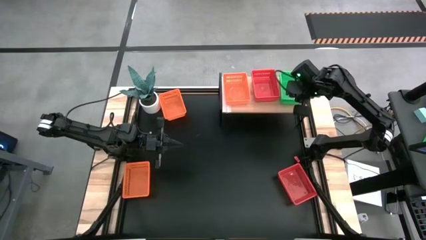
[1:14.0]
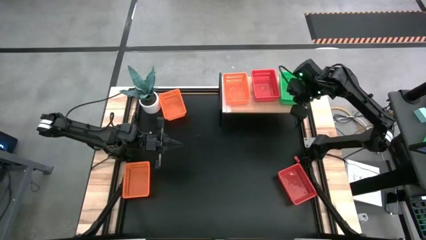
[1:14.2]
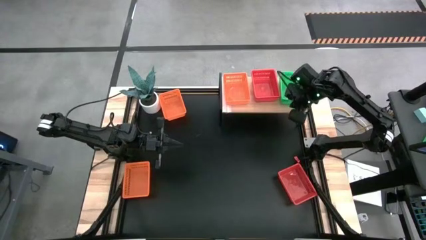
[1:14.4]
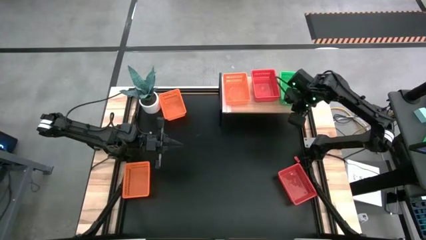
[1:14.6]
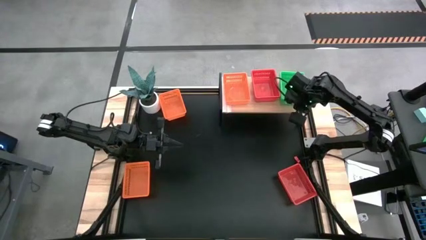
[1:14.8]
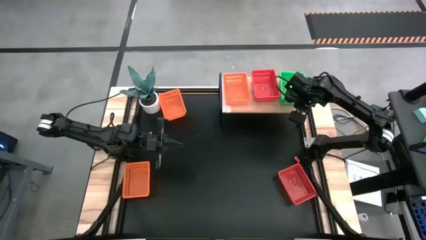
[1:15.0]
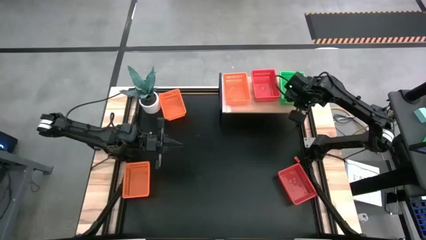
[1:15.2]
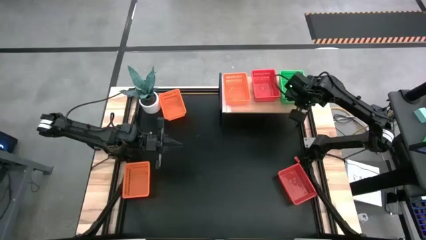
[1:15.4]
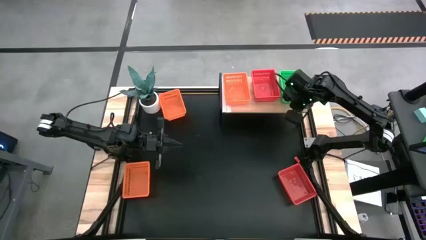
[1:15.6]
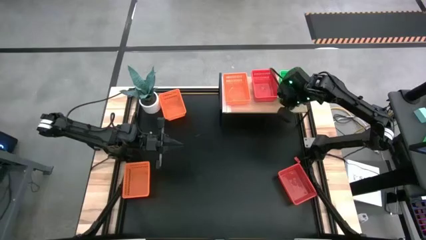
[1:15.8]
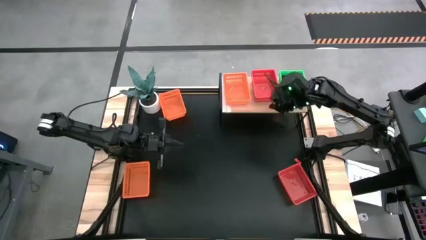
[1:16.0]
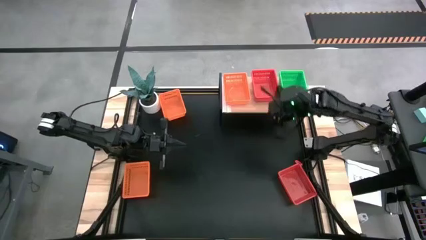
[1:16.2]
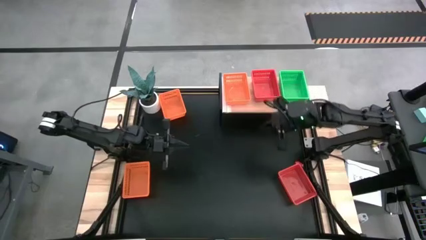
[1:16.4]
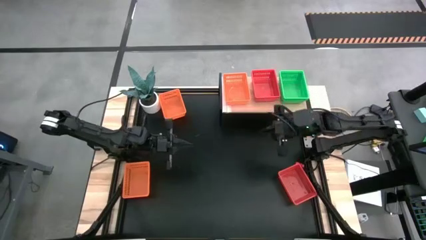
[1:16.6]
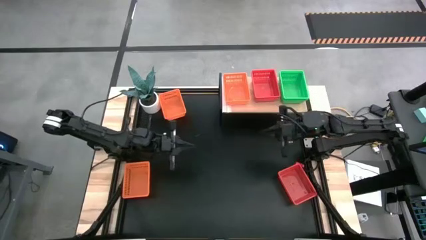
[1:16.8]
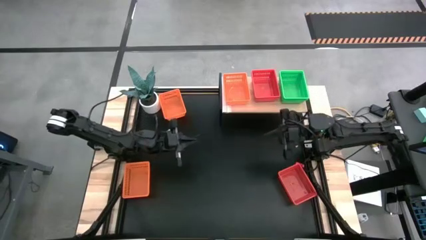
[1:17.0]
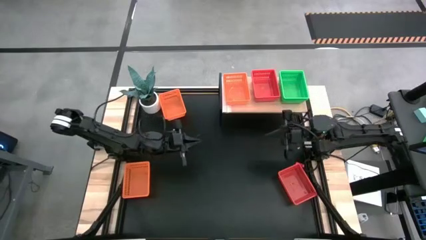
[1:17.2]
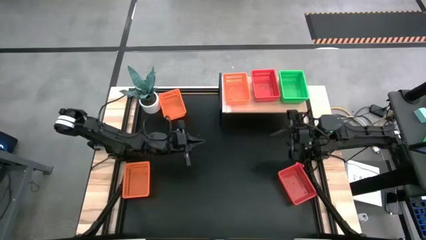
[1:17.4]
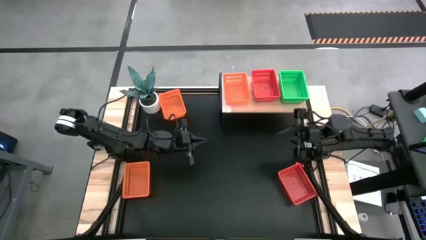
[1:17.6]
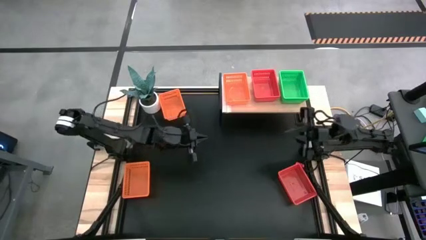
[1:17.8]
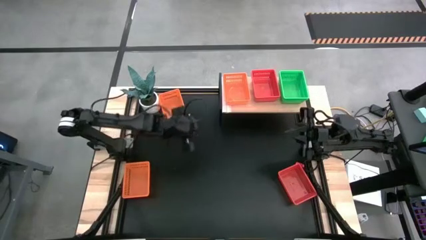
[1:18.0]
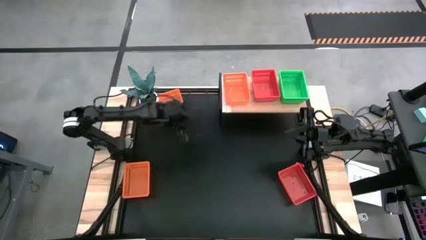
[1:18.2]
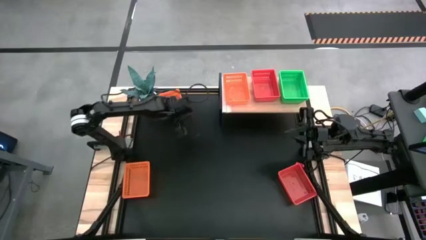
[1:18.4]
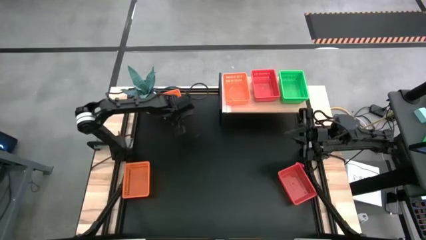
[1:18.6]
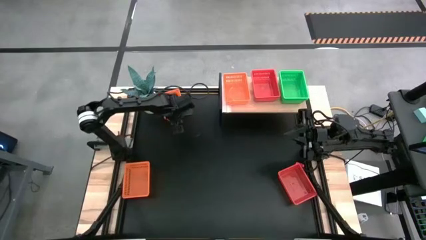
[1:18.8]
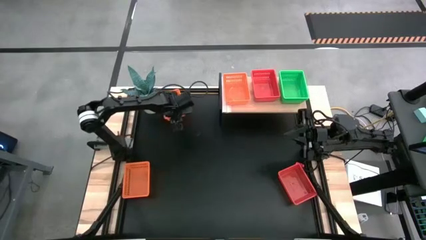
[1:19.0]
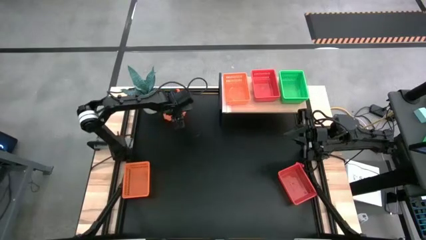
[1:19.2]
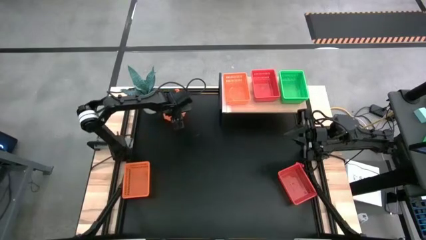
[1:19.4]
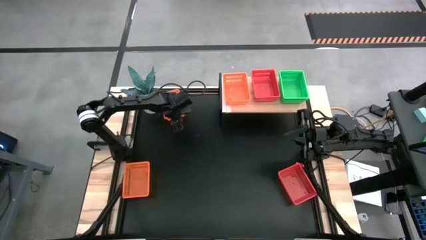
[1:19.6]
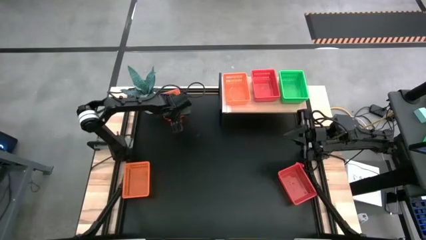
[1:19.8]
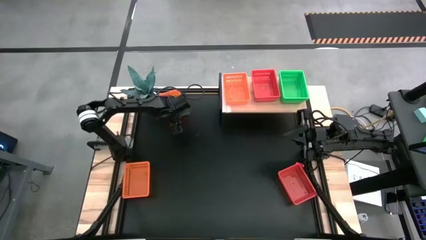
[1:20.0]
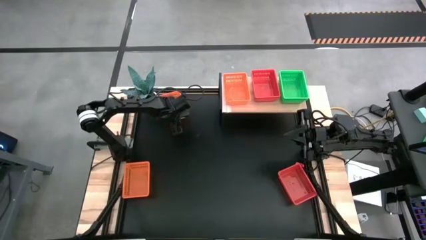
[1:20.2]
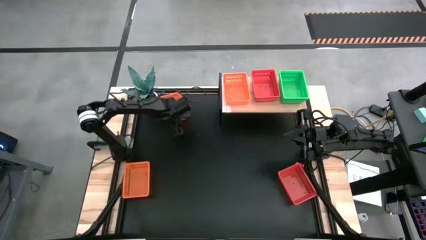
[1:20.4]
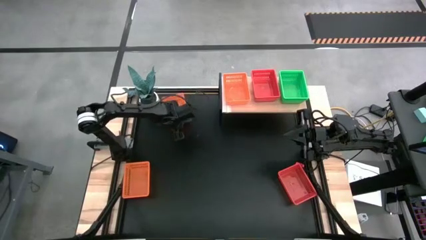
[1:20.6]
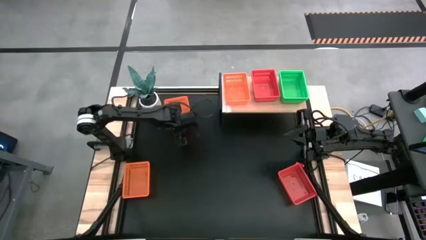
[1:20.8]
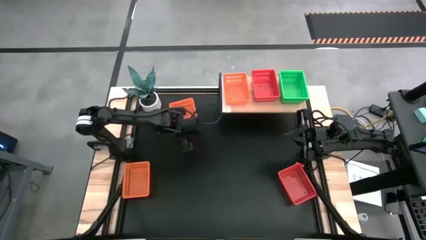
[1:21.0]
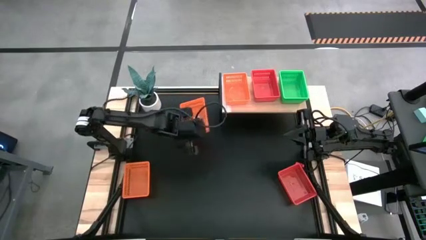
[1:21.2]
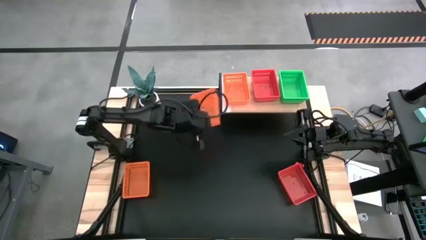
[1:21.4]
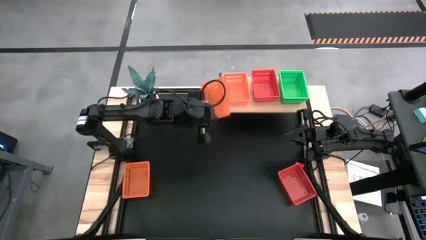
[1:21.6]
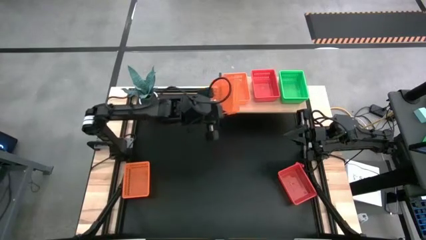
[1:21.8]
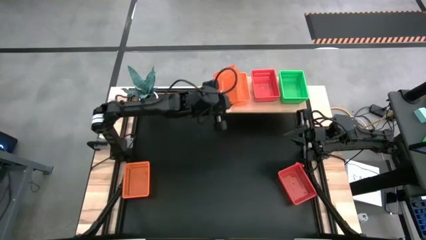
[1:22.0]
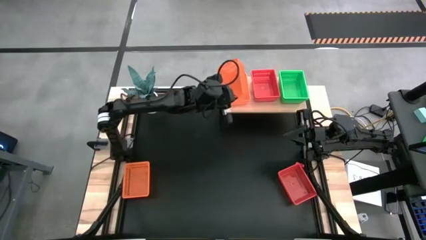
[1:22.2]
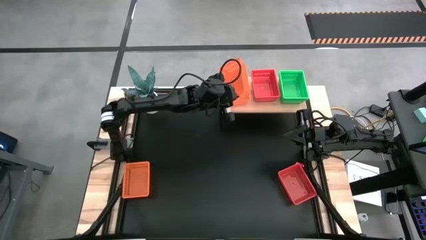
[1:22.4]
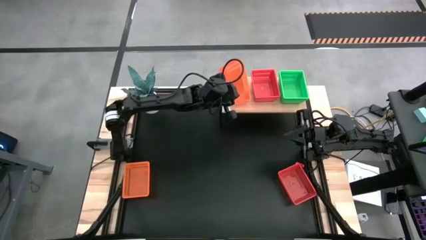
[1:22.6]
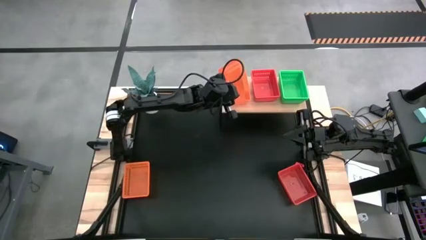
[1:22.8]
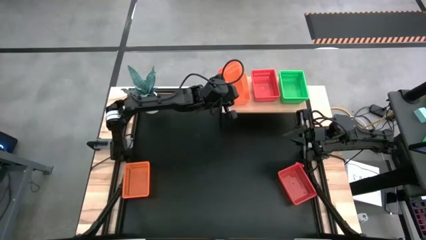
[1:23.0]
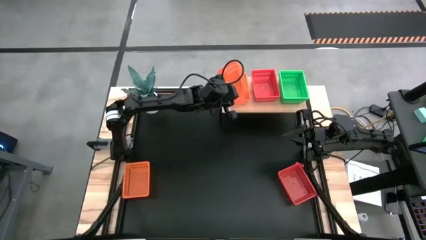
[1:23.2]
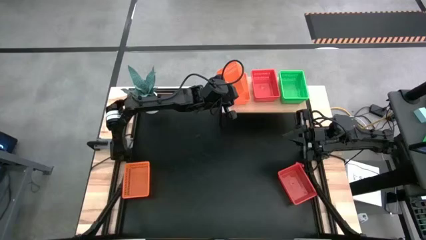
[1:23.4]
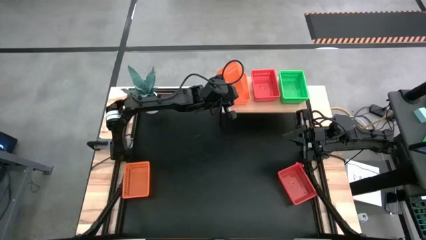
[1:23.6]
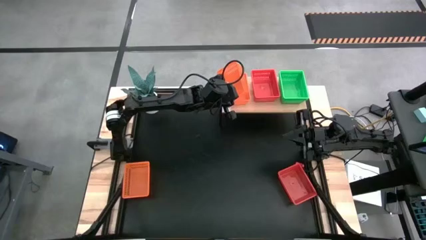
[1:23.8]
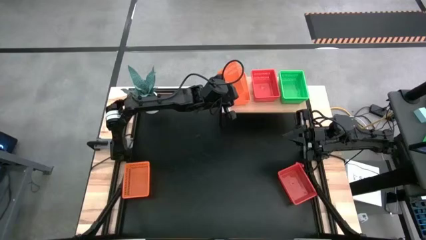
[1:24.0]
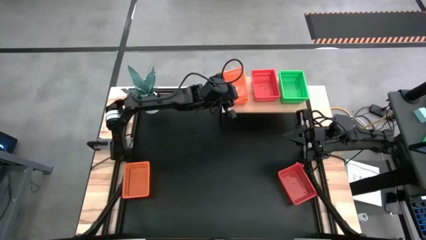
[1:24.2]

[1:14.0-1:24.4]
Task: Stack baskets on shelf by color
Stack the top orange bin on the other orange bin on the shelf

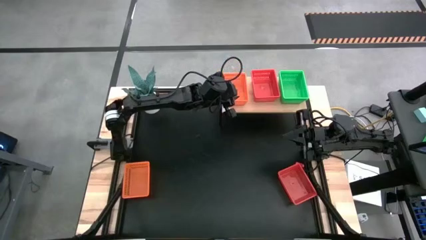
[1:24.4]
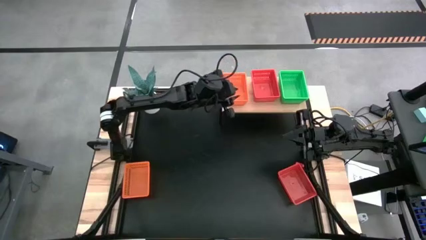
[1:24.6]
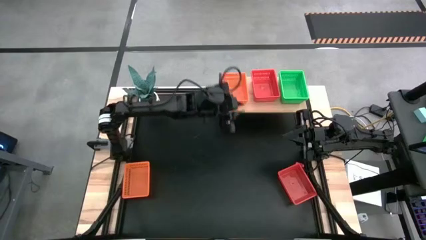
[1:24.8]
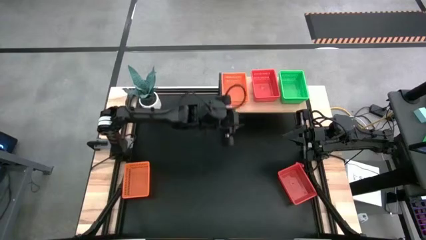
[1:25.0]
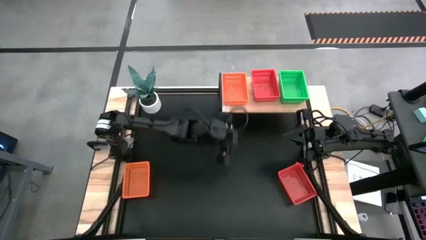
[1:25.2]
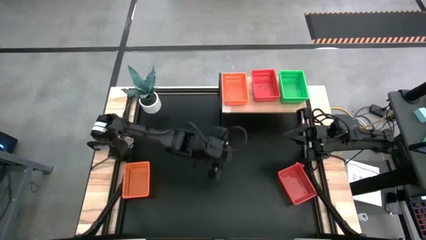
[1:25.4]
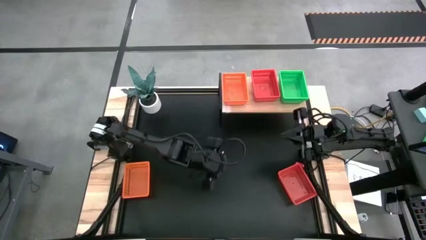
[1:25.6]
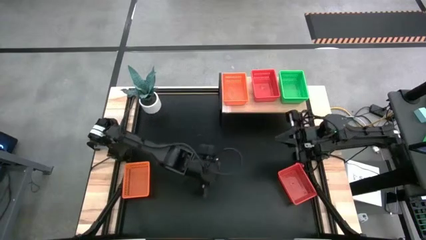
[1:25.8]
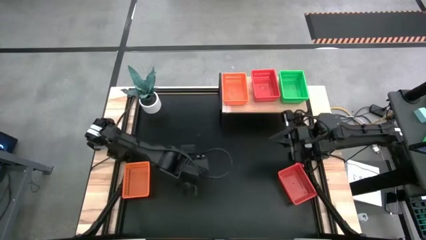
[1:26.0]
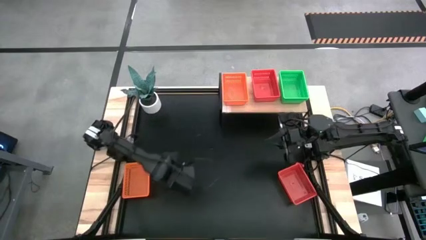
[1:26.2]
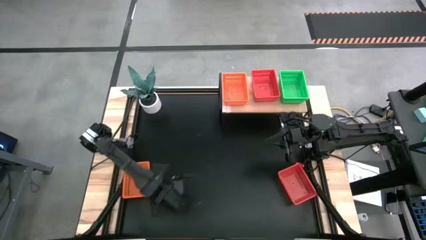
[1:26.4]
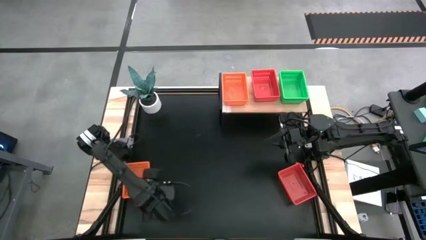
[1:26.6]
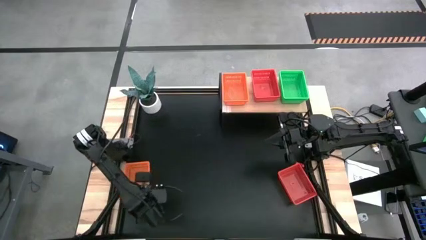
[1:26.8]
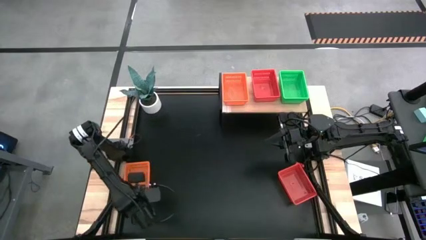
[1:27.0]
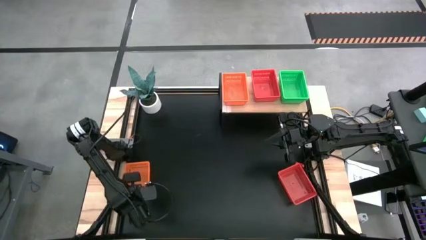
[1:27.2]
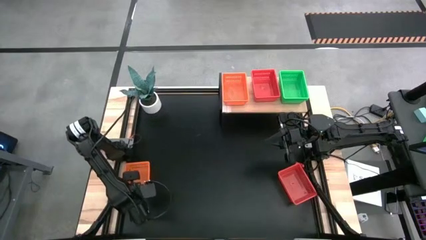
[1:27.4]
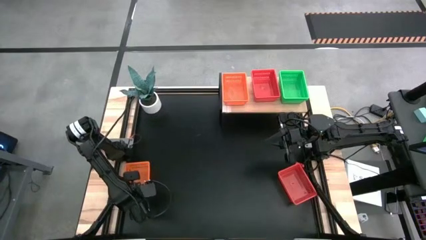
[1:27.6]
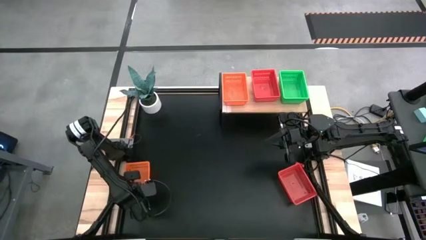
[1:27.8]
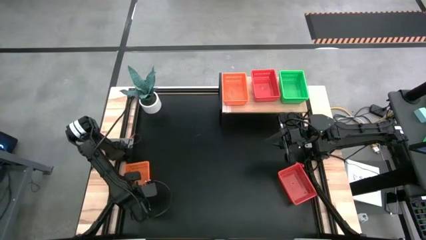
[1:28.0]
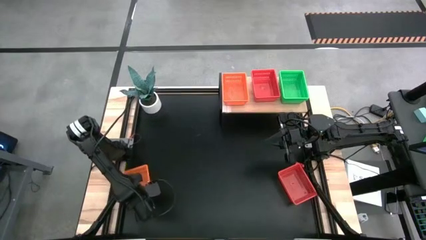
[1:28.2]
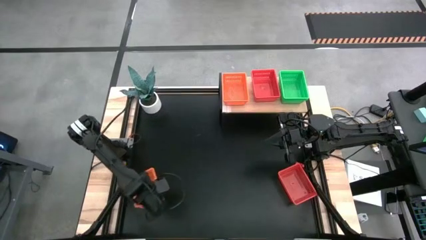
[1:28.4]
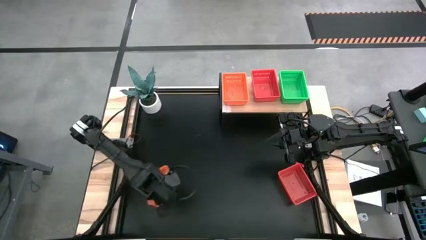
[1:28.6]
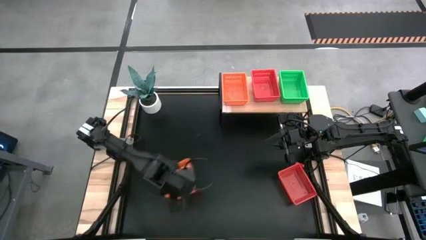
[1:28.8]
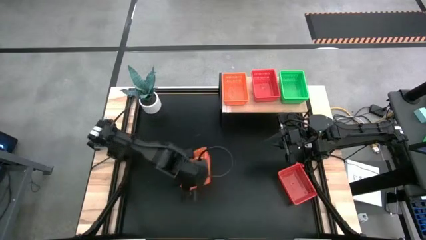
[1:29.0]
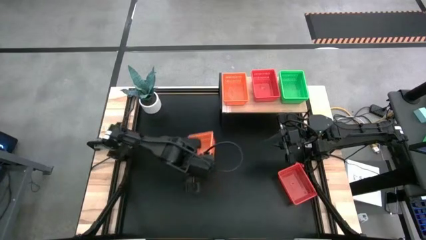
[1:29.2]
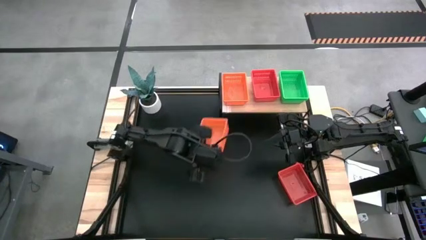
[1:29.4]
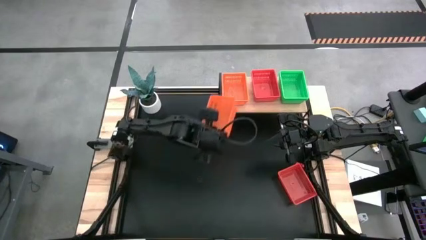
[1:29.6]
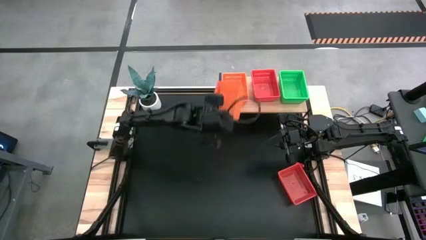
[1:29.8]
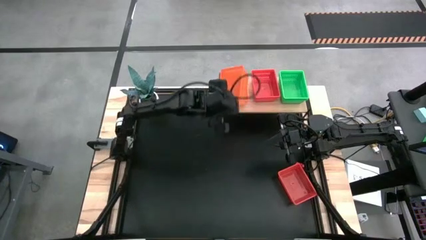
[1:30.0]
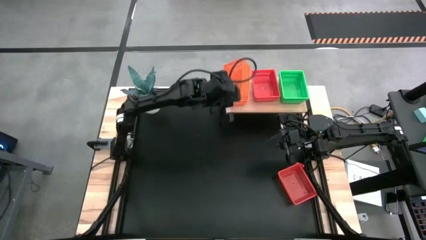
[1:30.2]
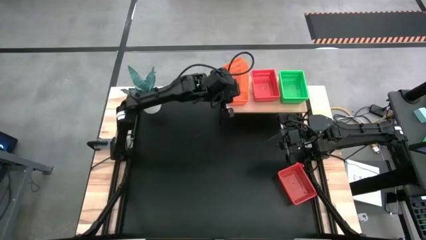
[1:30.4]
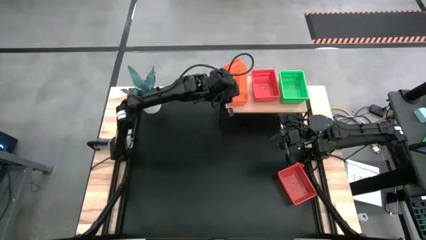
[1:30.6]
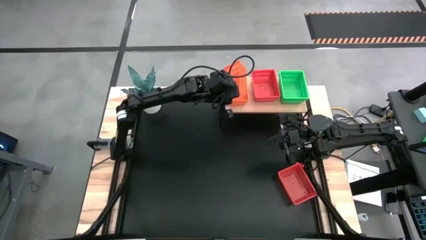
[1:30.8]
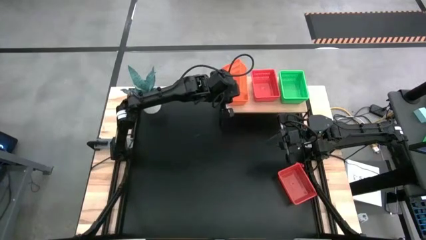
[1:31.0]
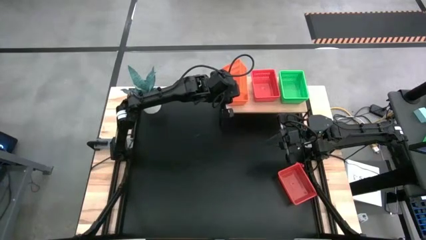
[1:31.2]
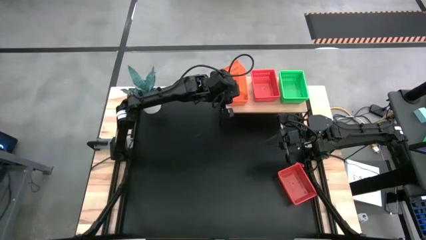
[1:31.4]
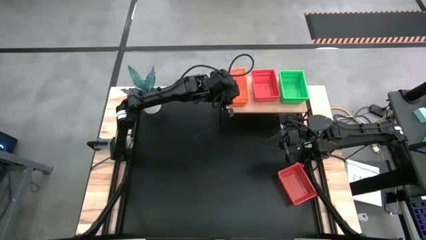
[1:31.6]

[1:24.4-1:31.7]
Stack the orange bin on the other orange bins on the shelf
